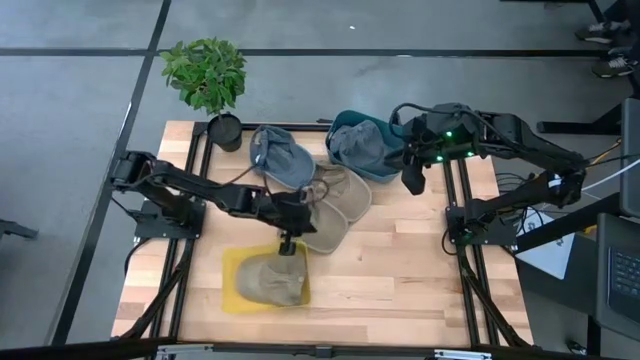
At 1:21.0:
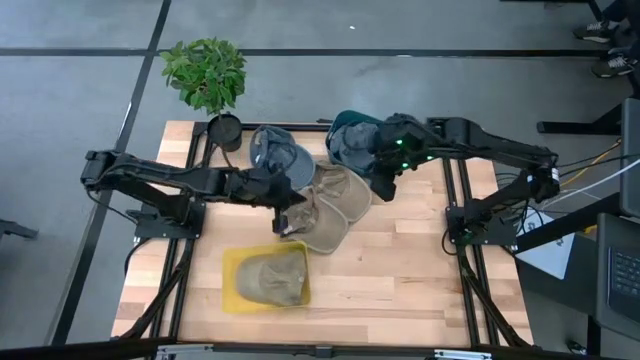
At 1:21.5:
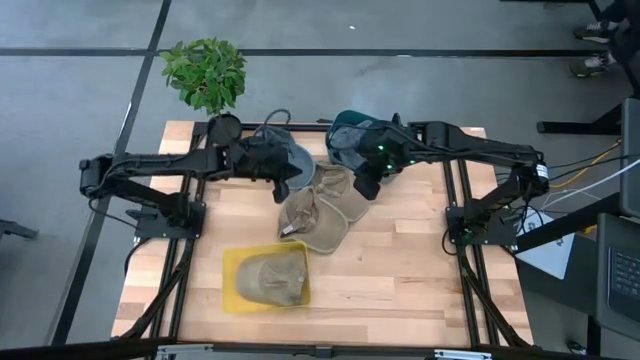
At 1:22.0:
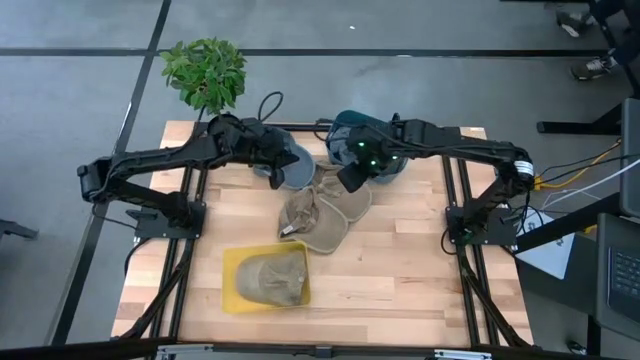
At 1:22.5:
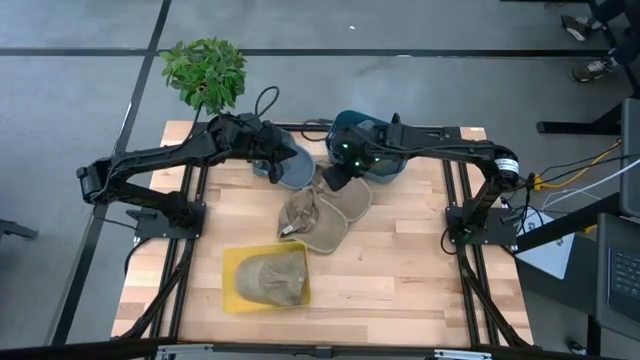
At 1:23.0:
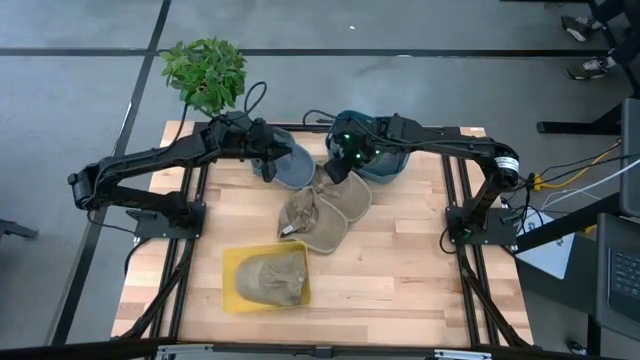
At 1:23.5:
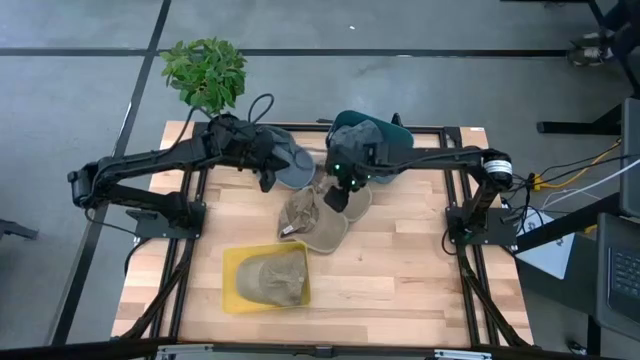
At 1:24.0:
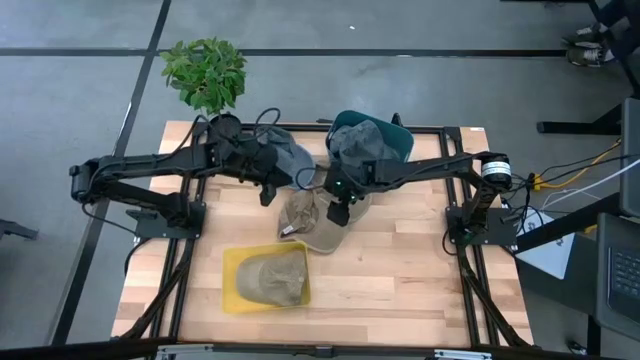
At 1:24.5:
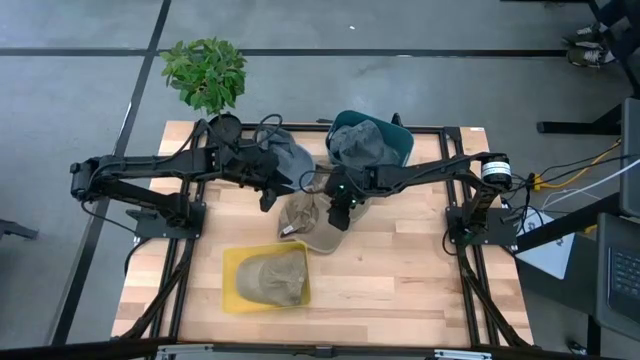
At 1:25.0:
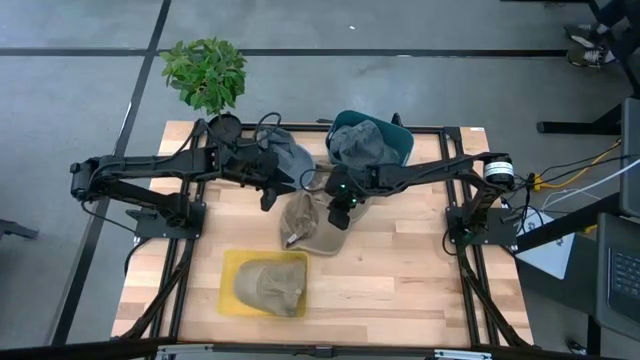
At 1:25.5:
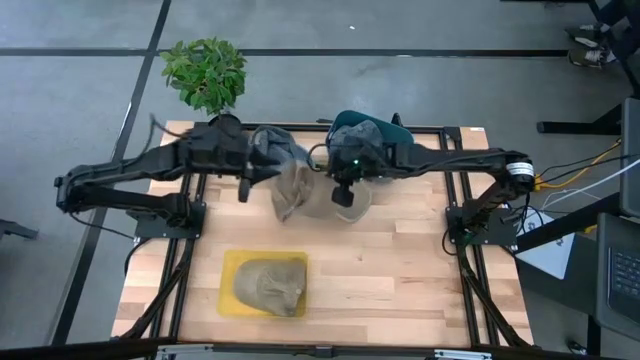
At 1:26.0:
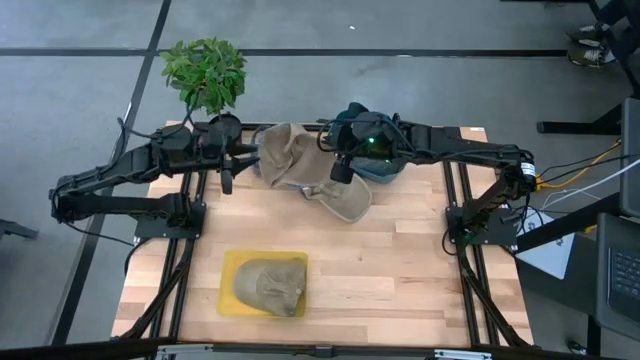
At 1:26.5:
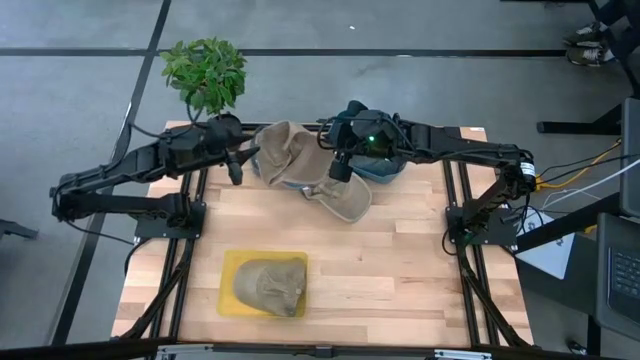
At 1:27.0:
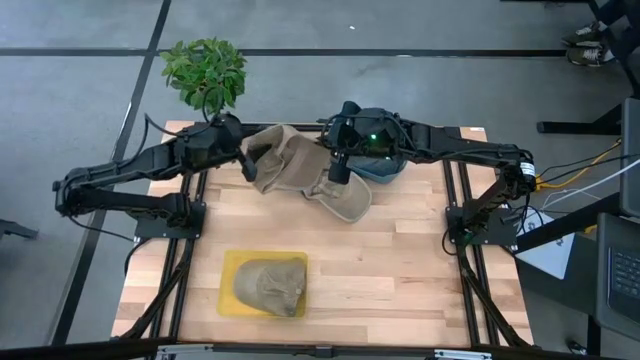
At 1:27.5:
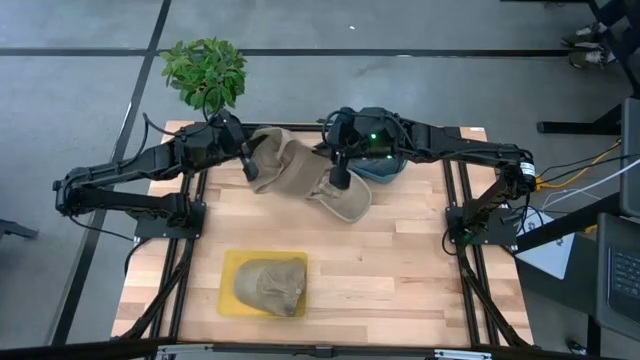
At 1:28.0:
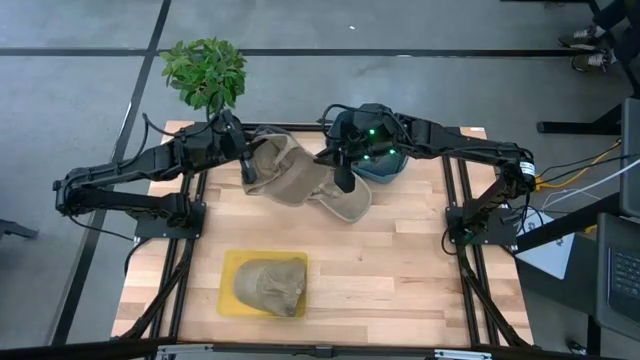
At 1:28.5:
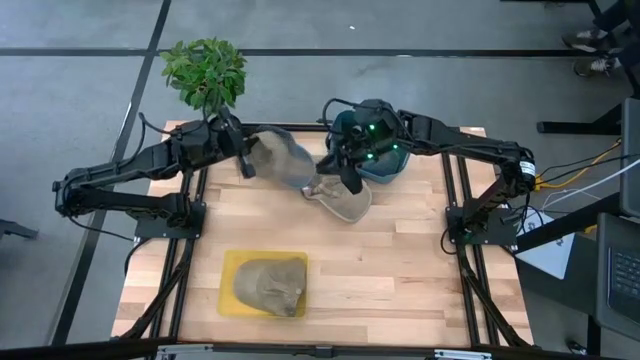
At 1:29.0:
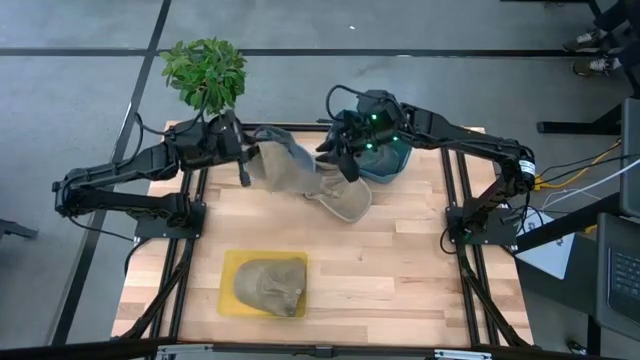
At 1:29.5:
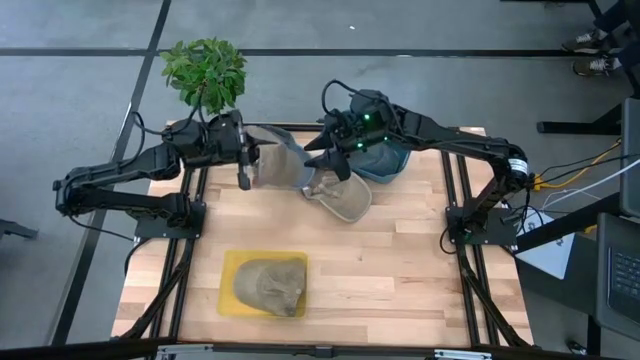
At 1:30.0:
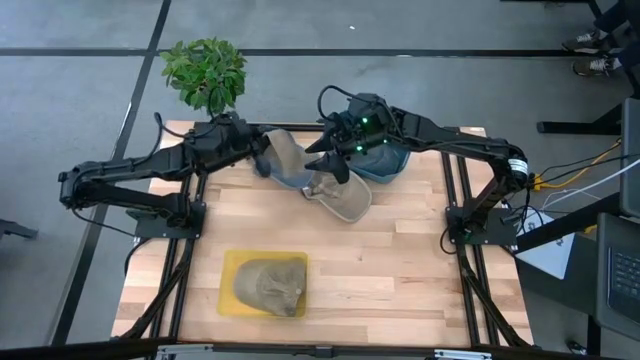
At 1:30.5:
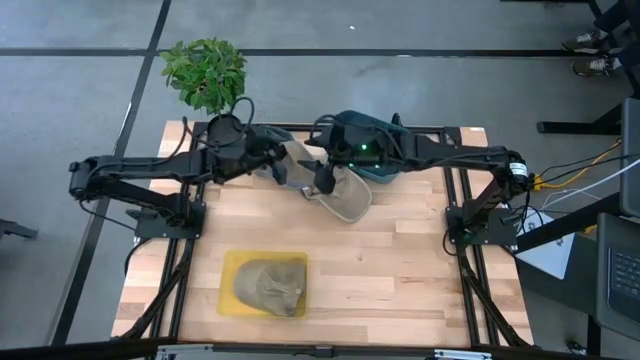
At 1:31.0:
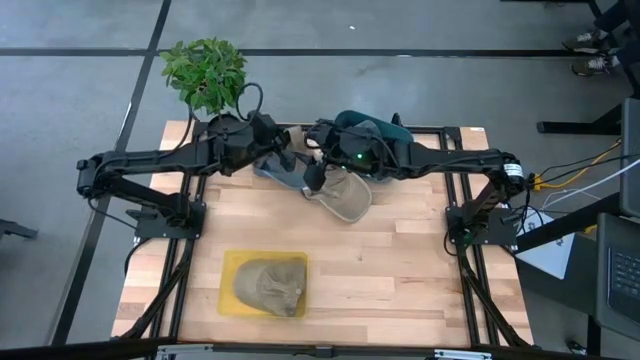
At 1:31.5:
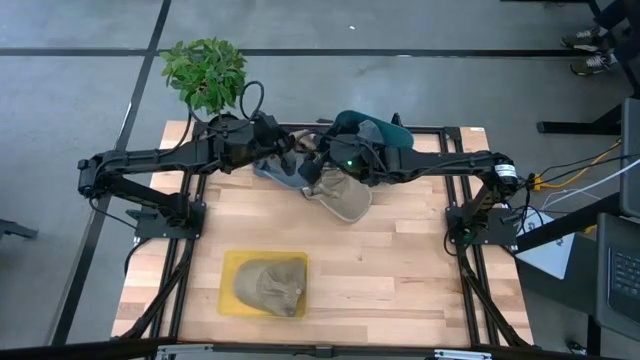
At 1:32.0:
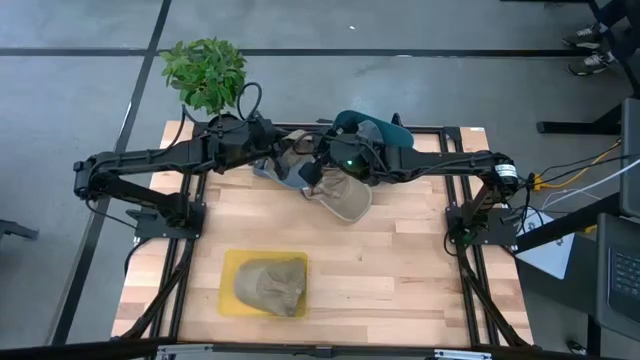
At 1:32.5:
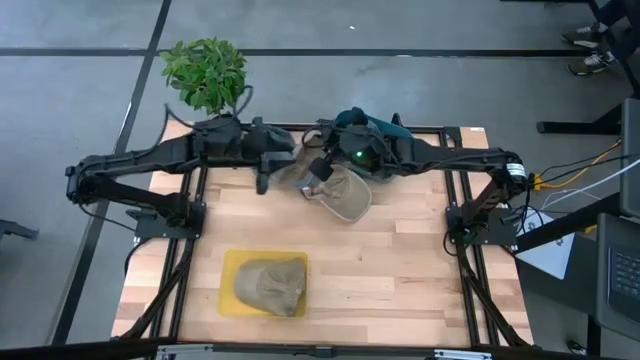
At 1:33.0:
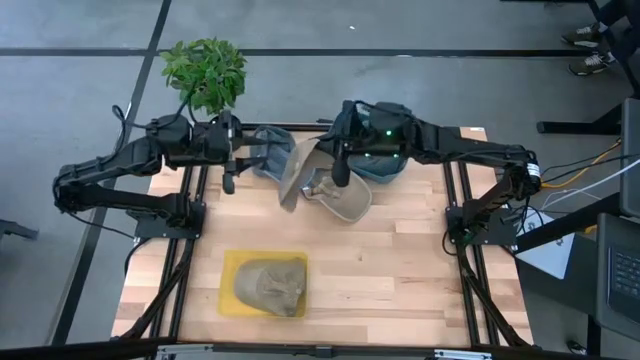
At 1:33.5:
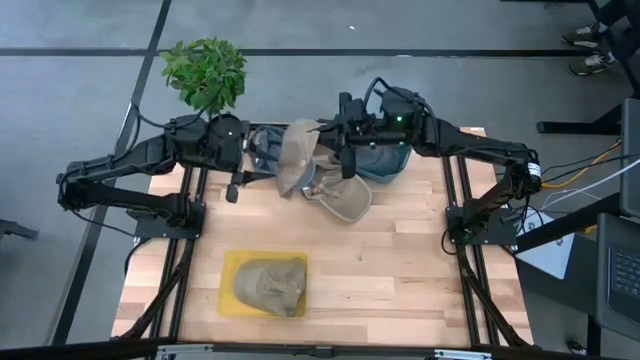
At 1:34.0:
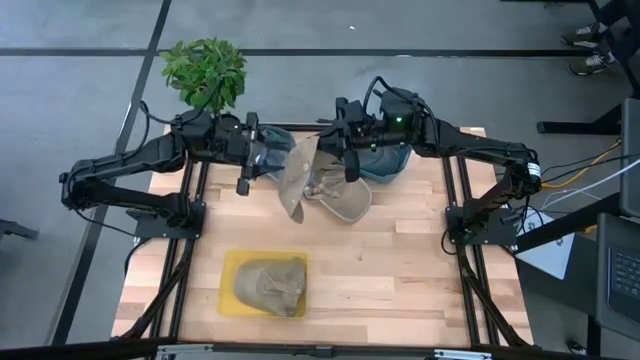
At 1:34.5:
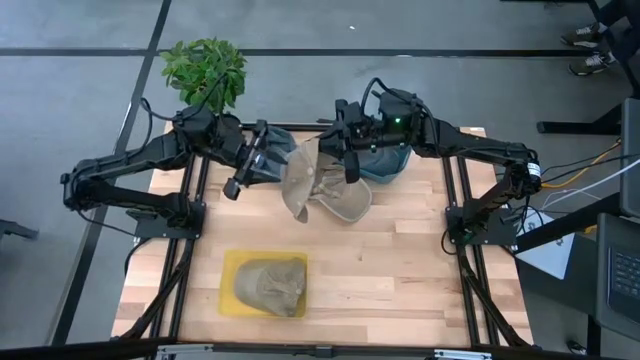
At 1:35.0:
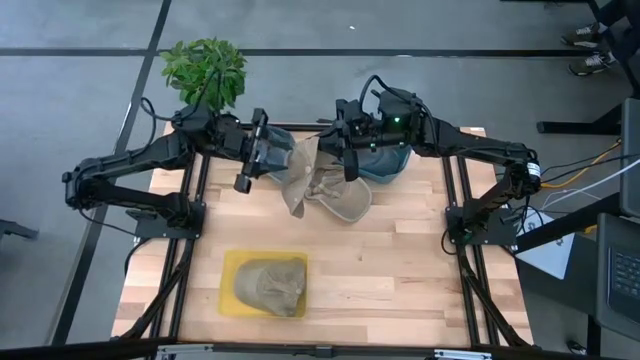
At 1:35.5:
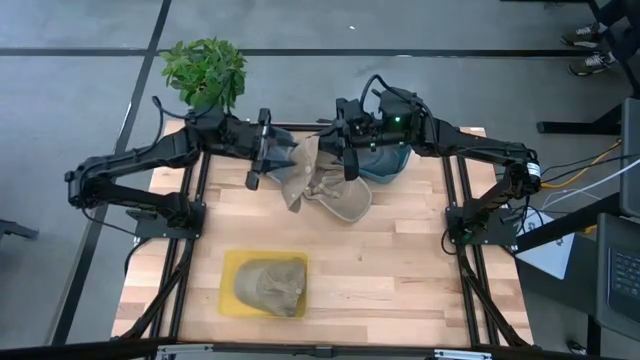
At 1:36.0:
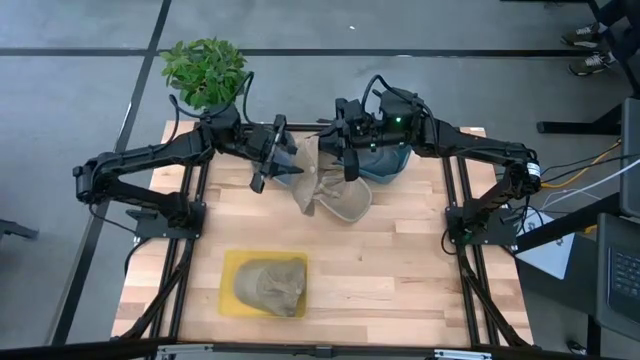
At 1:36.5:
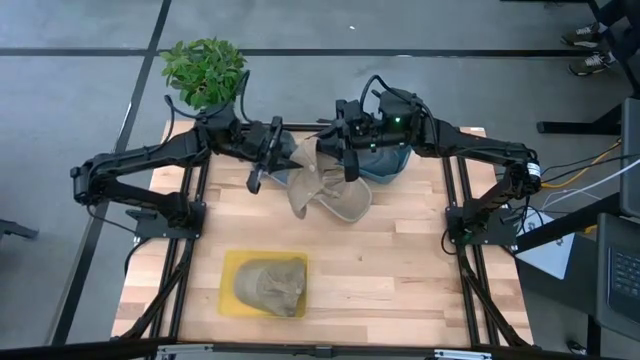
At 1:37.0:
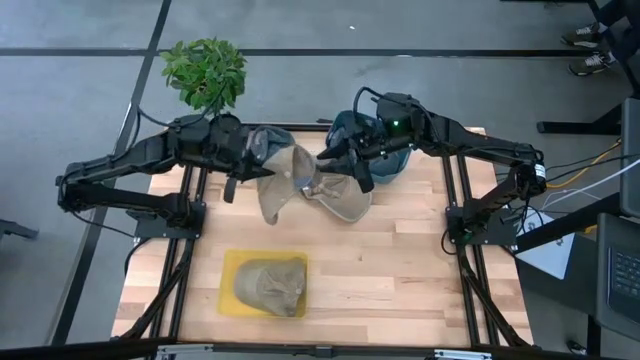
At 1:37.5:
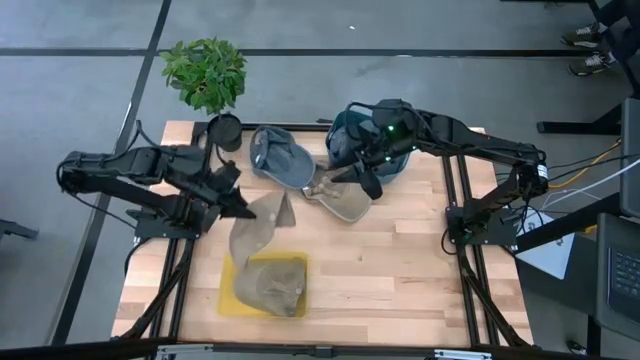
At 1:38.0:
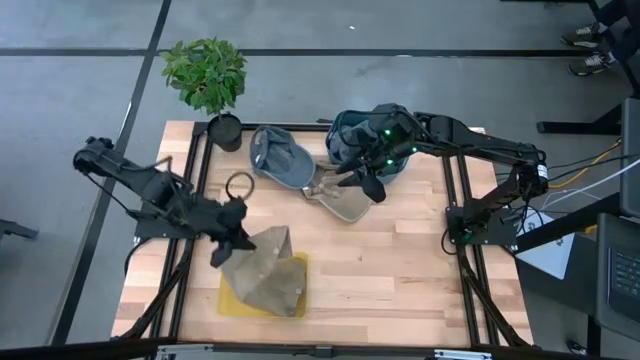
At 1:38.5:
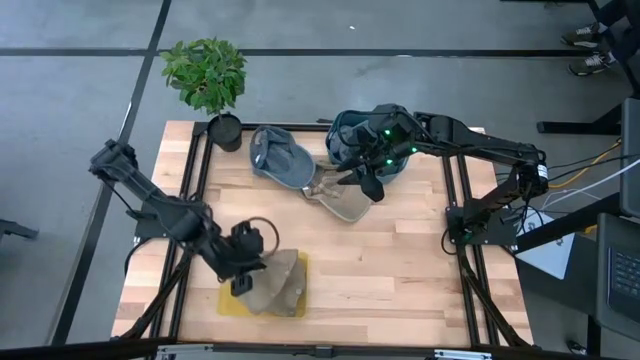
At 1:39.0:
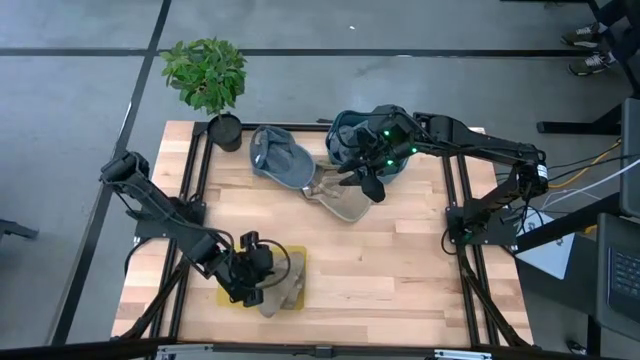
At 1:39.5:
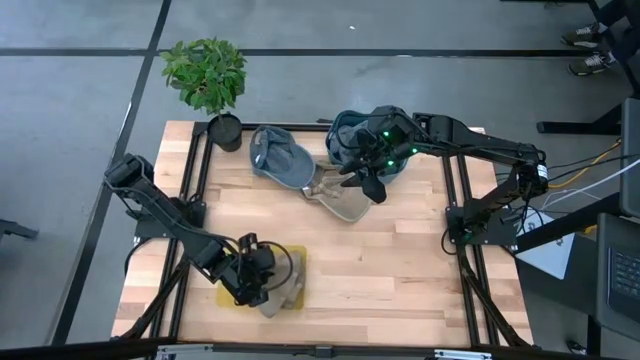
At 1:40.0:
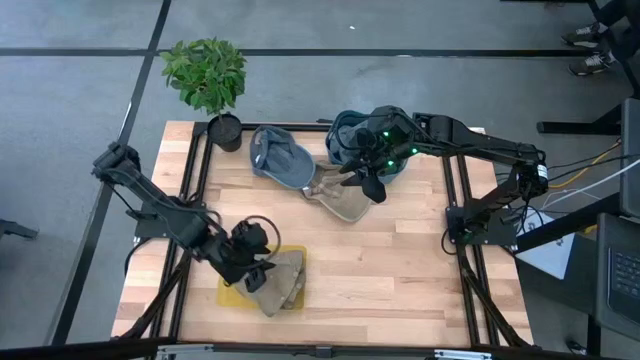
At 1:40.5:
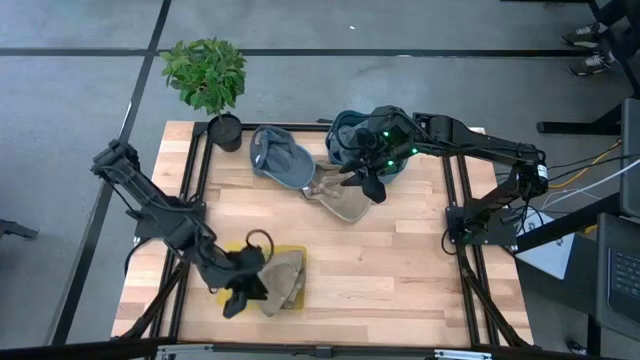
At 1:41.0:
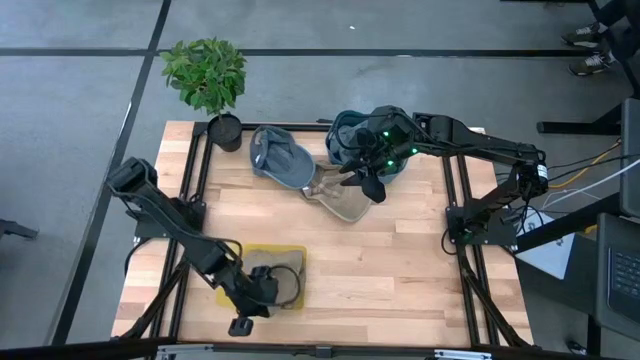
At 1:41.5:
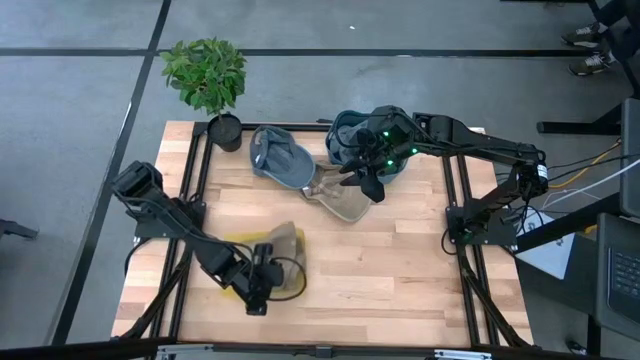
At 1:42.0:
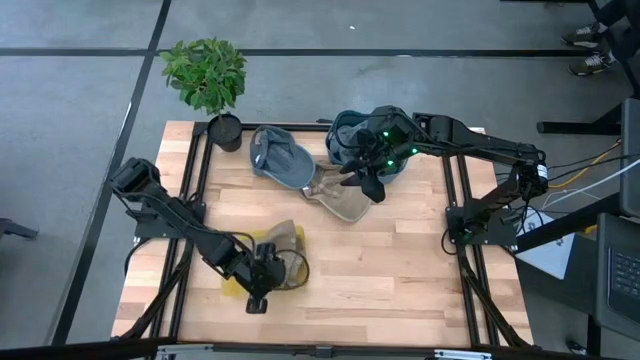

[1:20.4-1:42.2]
Task: Pick & Place hat
Put the bottom brown cap into the yellow bin
